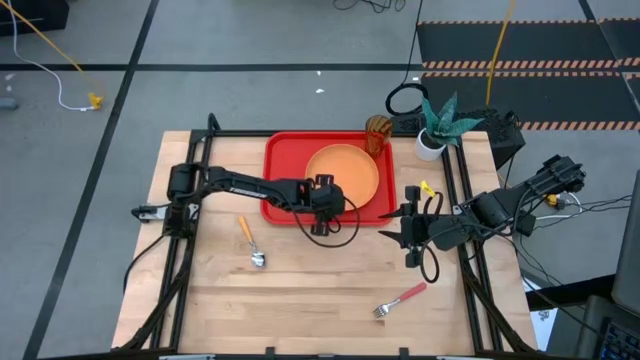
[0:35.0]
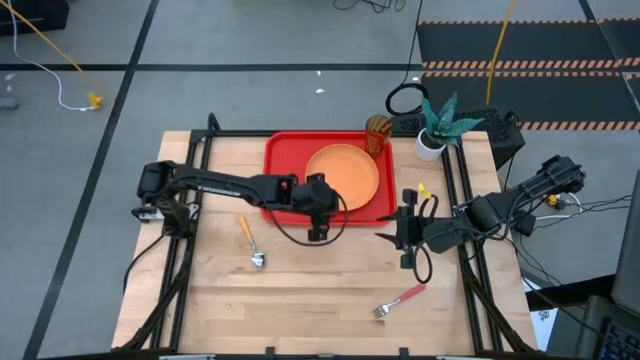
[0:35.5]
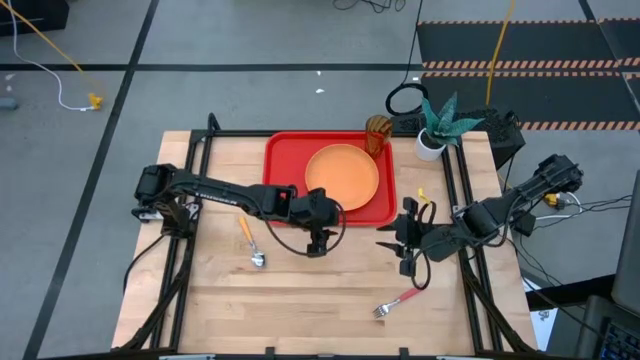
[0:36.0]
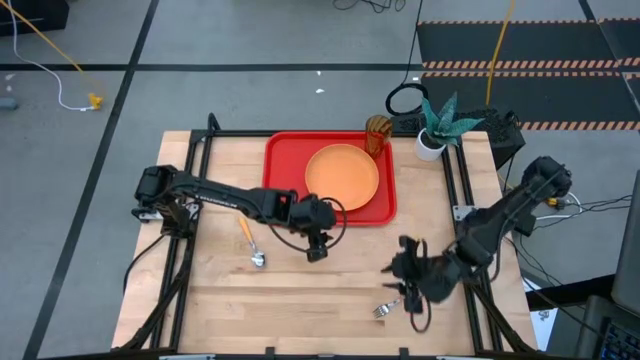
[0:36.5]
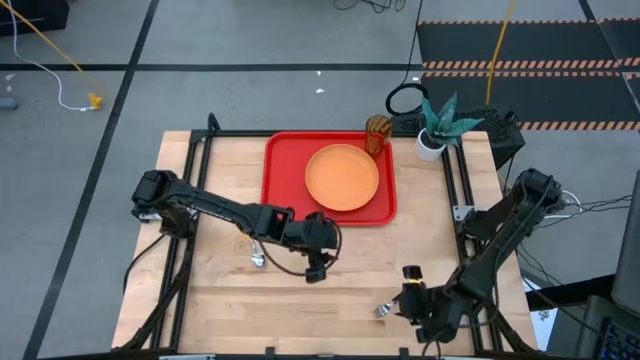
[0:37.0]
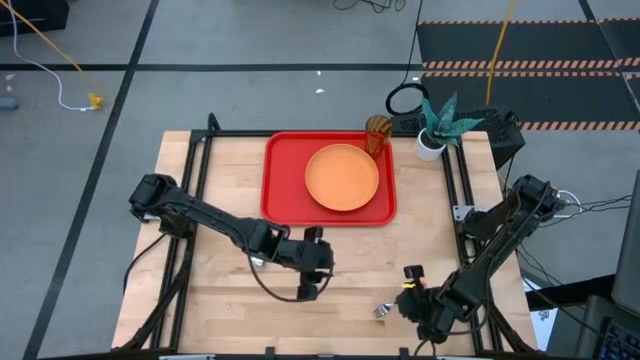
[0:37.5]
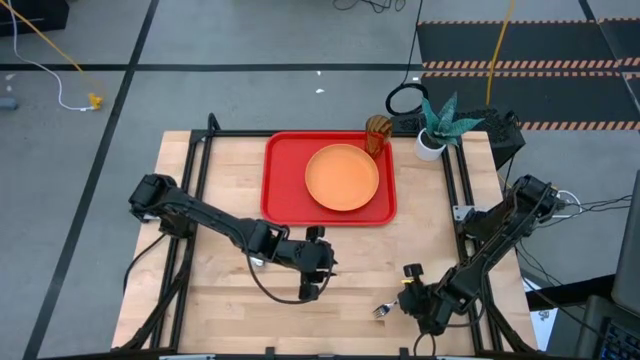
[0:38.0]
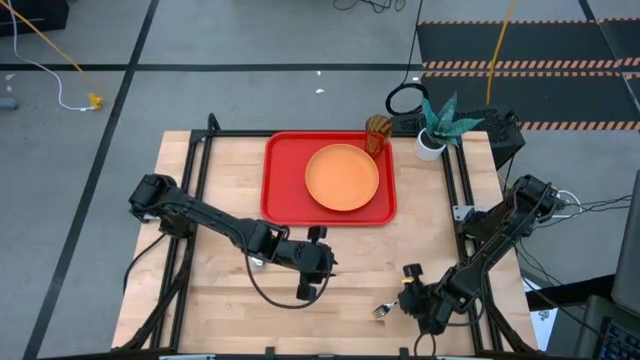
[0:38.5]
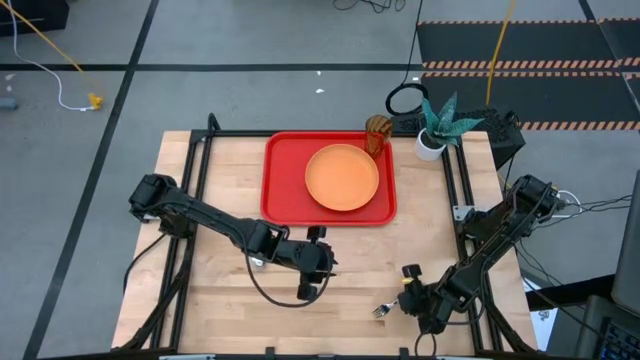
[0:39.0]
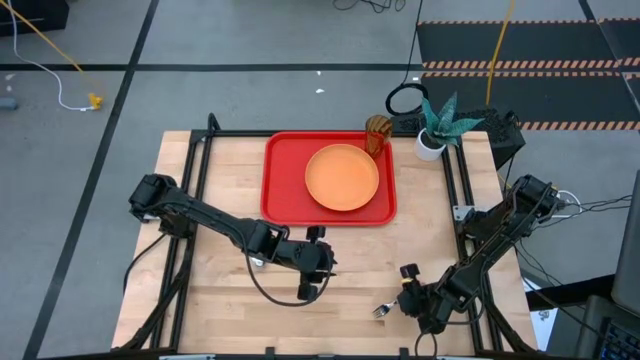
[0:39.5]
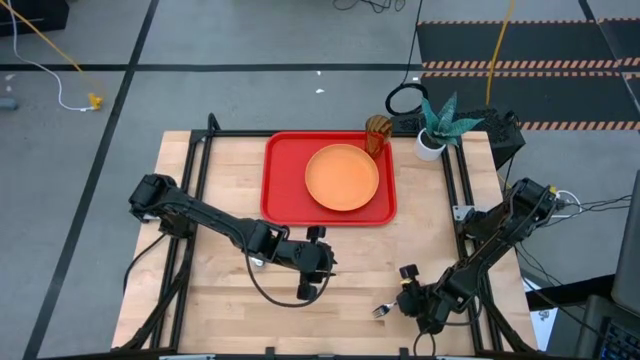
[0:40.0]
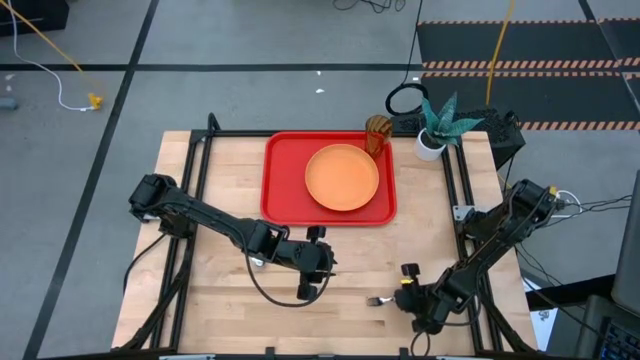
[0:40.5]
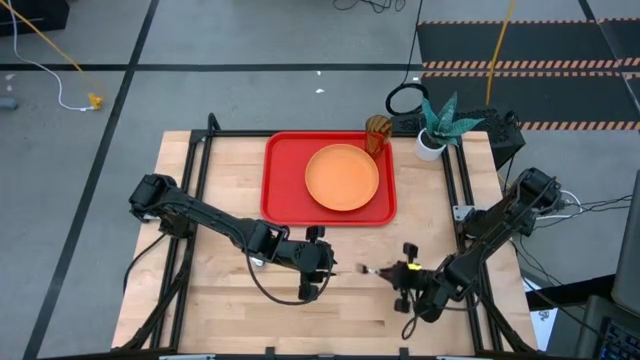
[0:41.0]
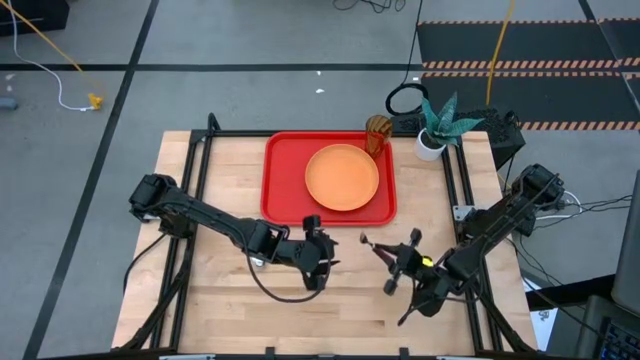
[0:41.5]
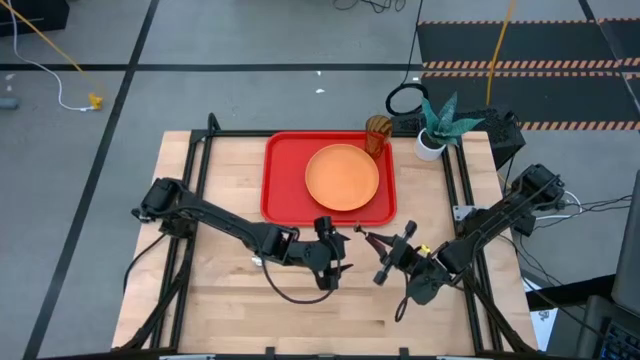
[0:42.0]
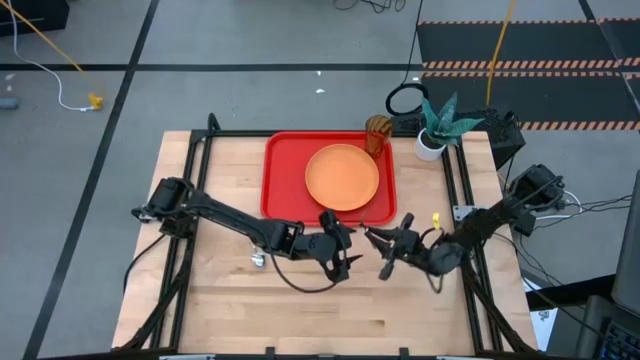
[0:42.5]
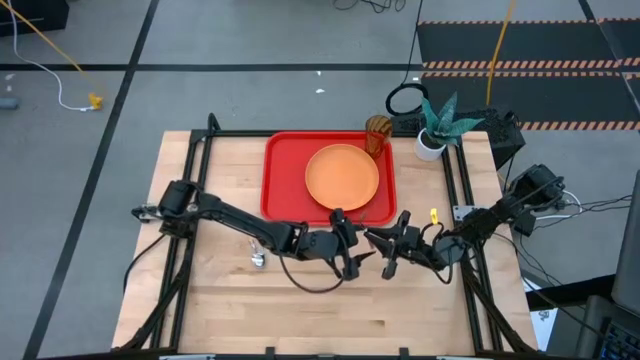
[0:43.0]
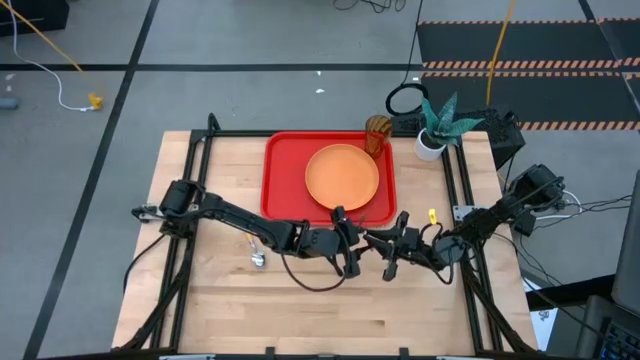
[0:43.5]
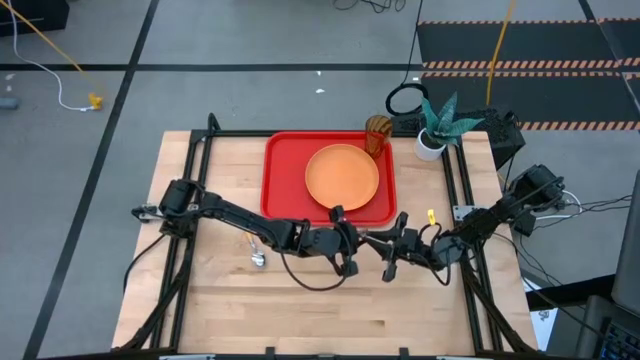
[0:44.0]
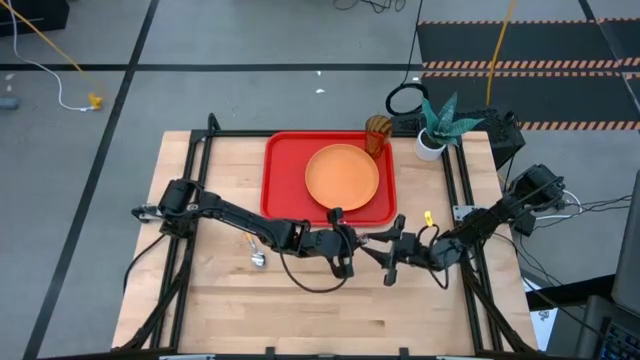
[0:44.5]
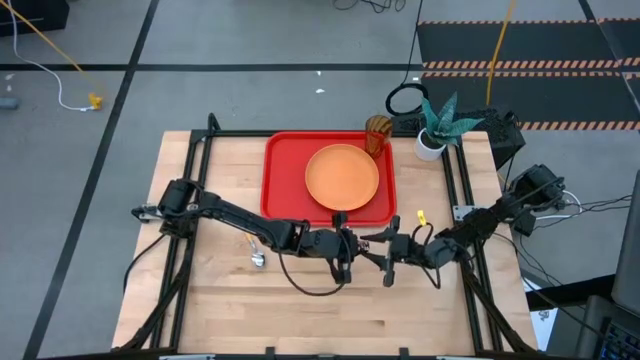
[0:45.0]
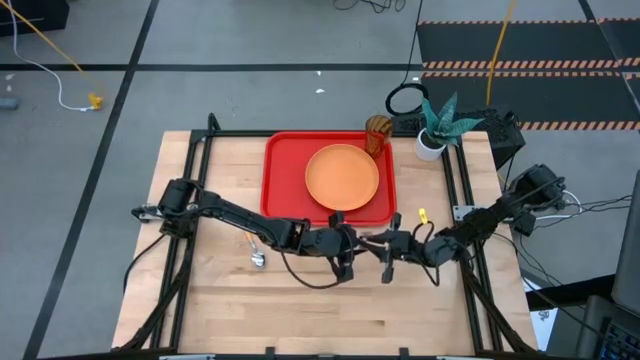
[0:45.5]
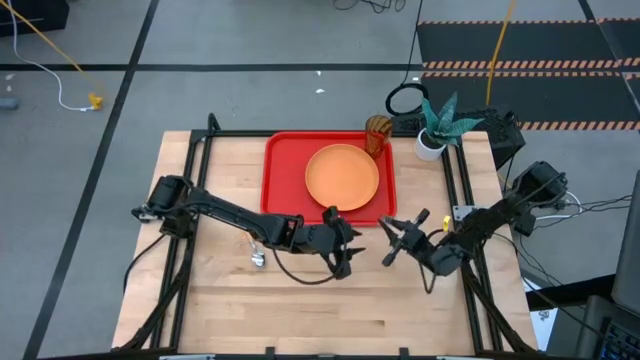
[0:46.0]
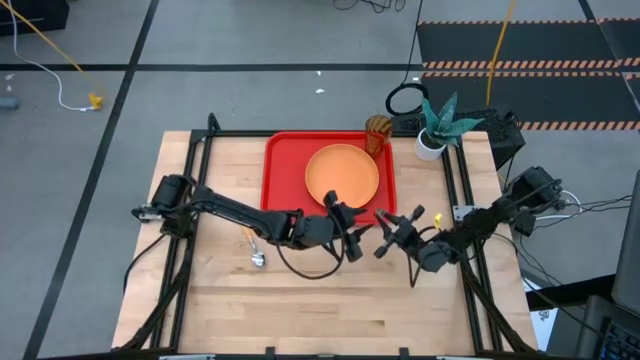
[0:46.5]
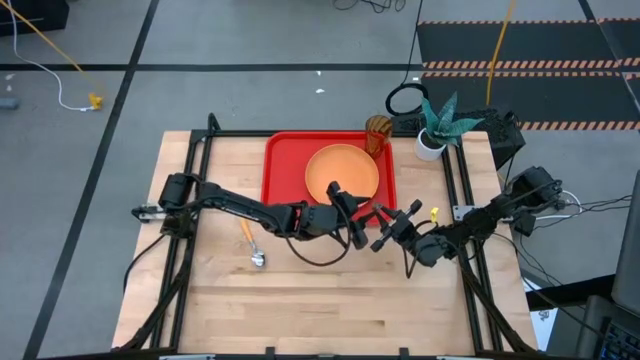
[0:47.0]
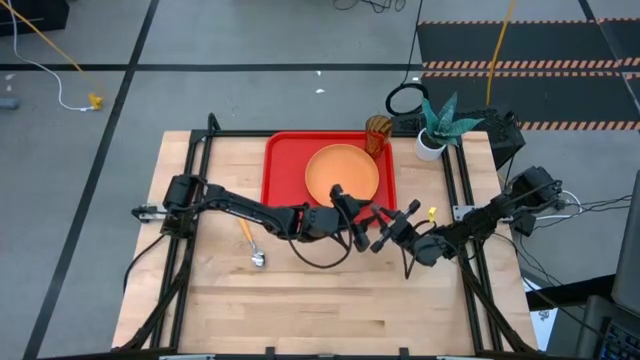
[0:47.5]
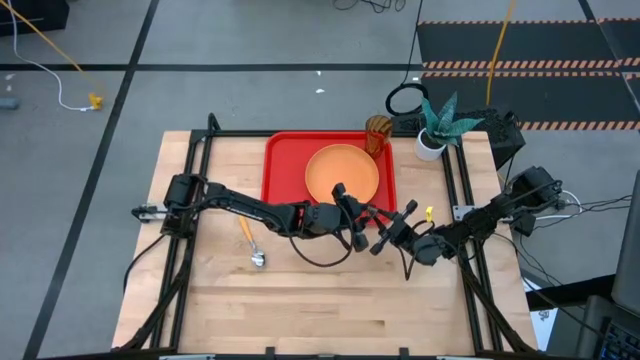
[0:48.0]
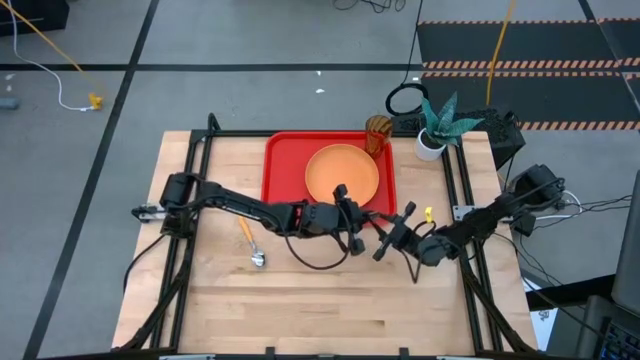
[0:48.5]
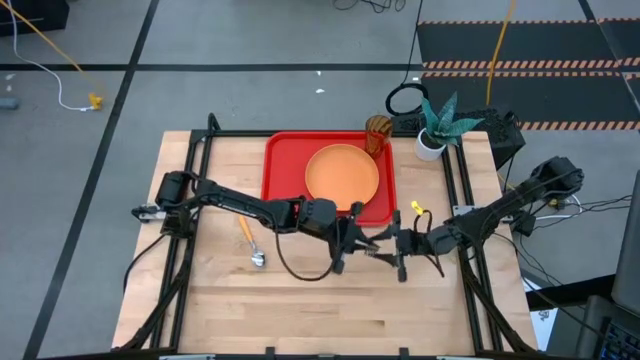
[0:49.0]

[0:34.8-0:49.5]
Task: Pick and place plate/cup/fork/spoon on tray
Put the pink fork on the red serving tray to the left of the orange plate

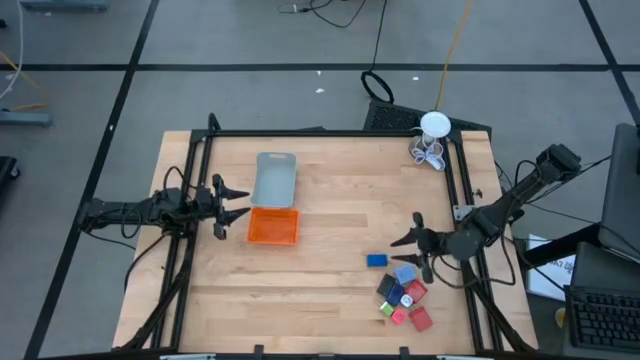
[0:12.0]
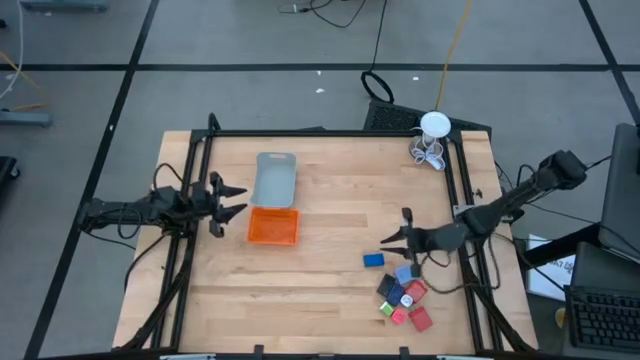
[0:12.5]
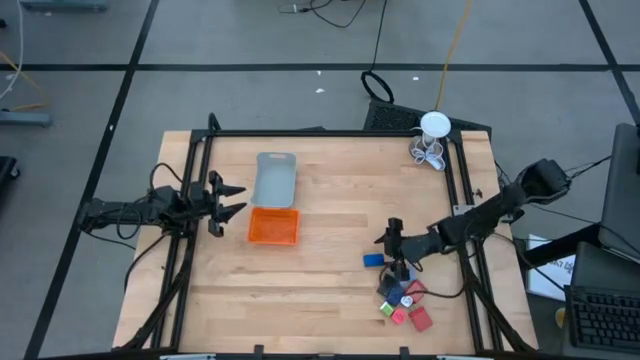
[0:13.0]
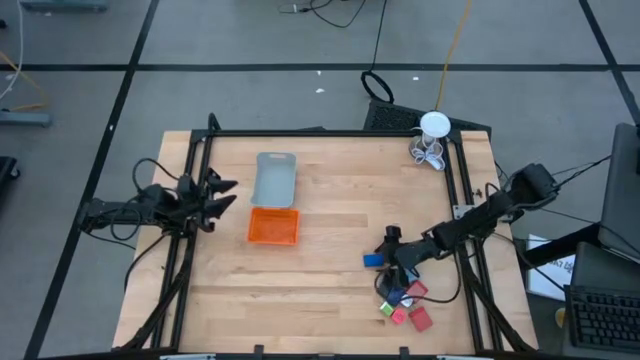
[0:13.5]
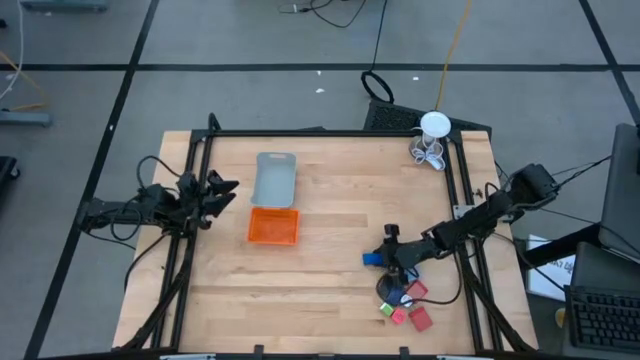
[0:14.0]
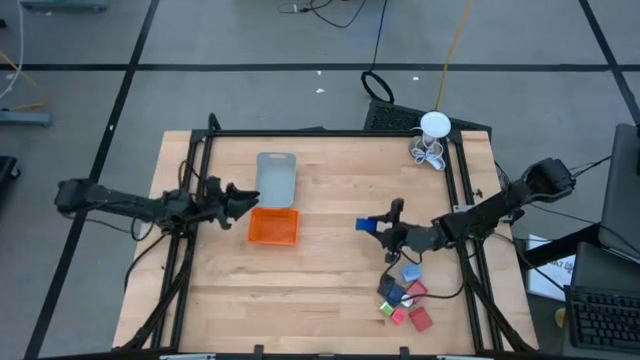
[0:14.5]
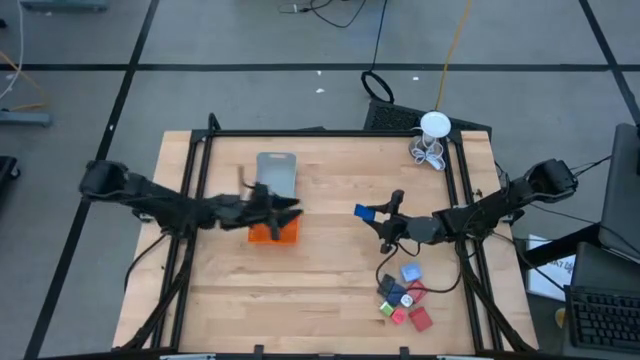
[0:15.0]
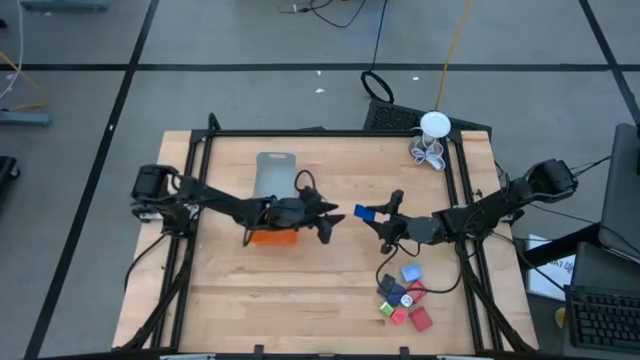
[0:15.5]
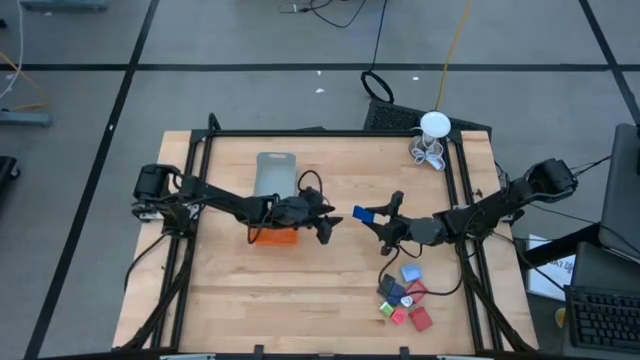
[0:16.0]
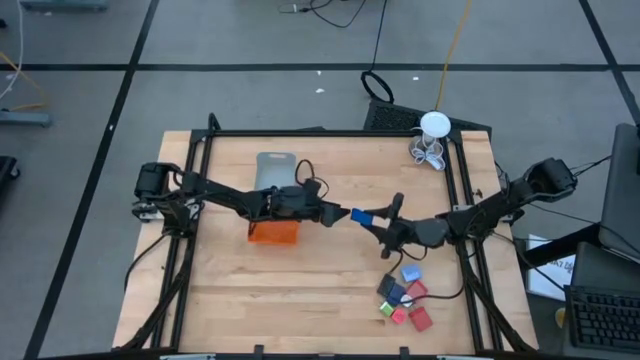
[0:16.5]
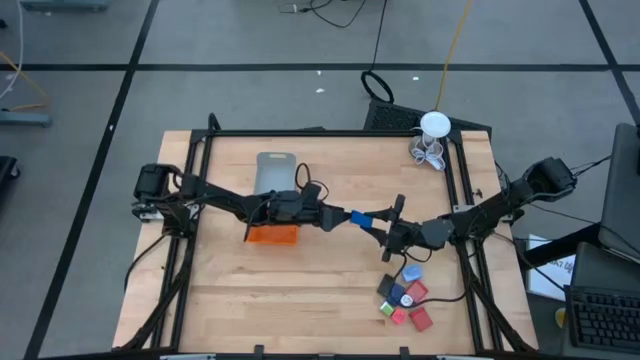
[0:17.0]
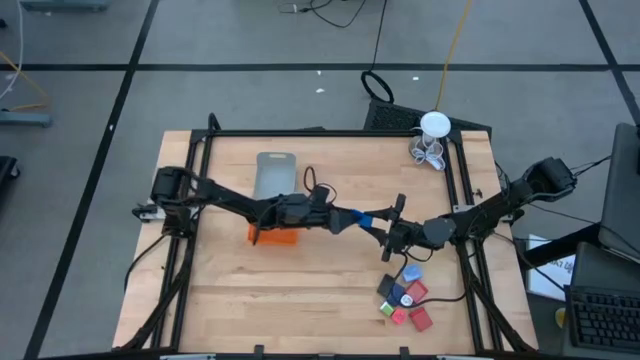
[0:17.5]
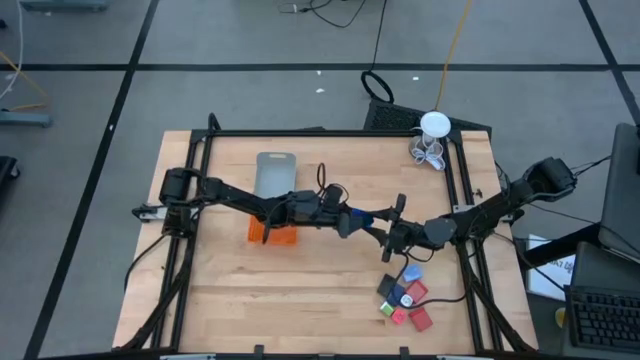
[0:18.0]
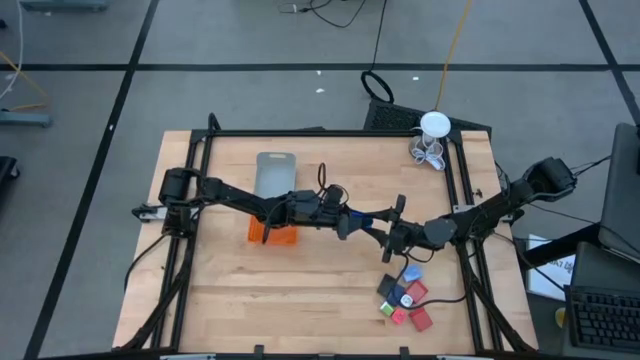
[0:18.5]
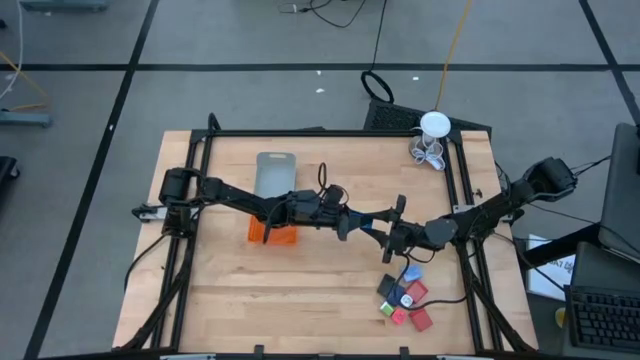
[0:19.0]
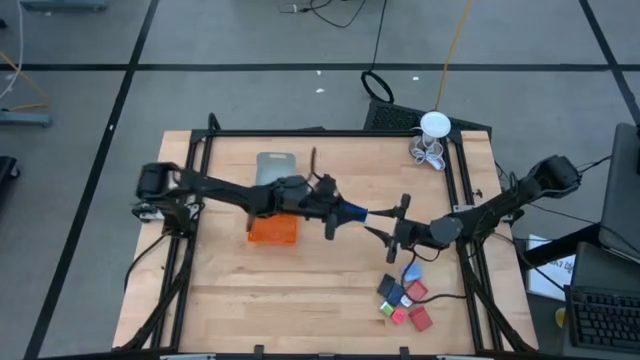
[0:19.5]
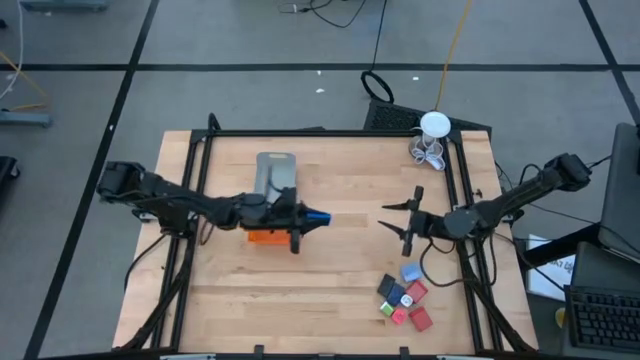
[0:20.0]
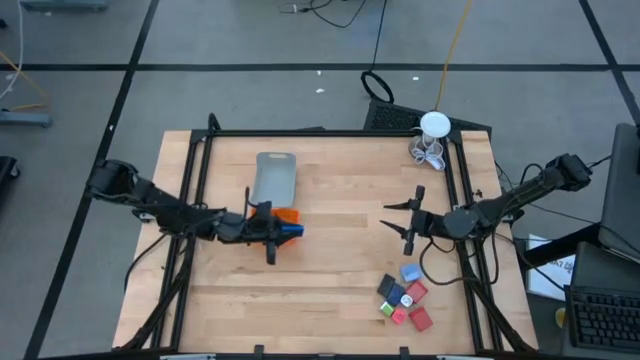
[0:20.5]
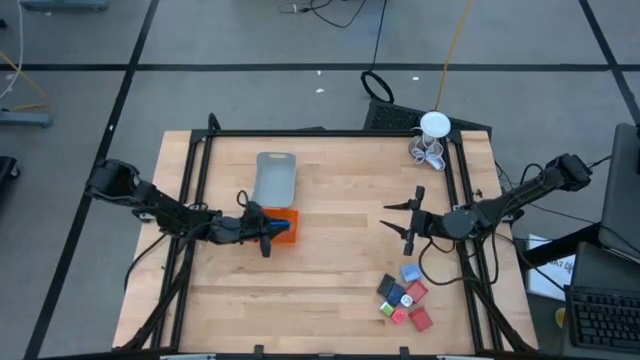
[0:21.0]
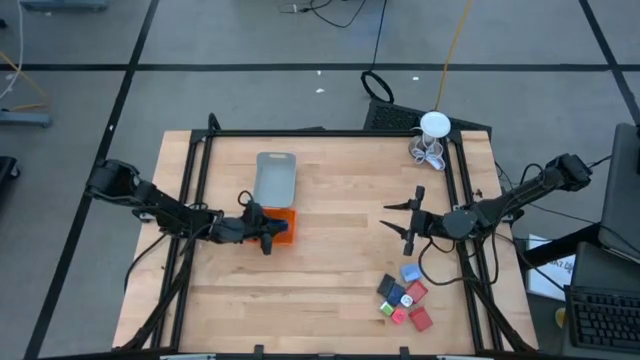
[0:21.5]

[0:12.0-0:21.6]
Task: Pick & Place Office items
Put the blue digital timer into the orange bin
